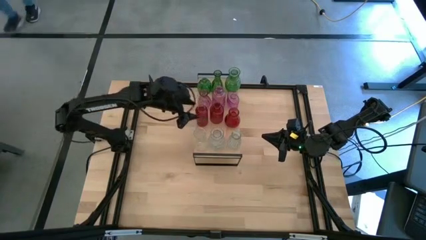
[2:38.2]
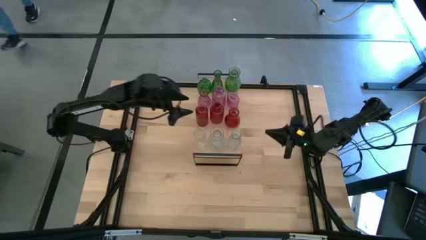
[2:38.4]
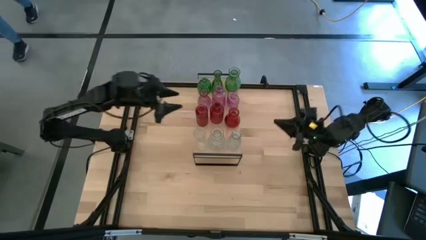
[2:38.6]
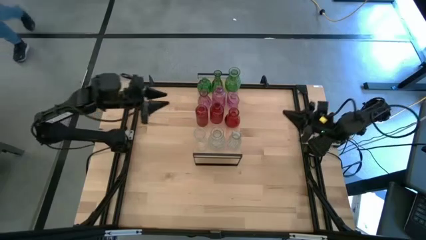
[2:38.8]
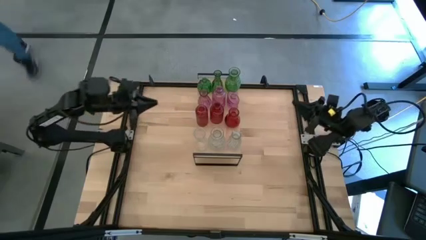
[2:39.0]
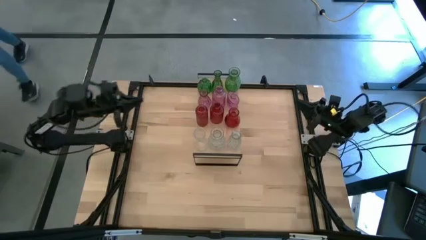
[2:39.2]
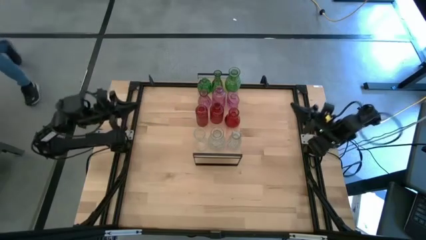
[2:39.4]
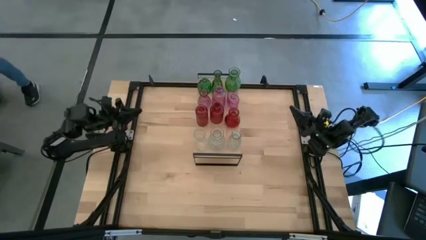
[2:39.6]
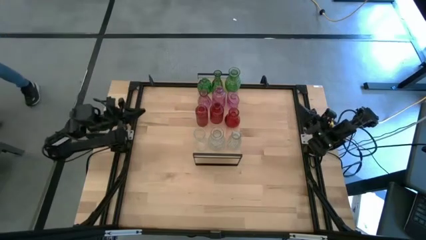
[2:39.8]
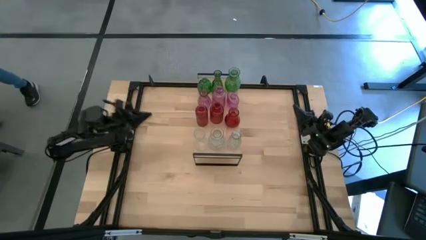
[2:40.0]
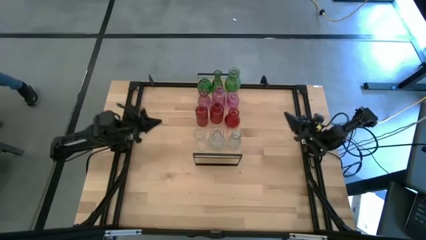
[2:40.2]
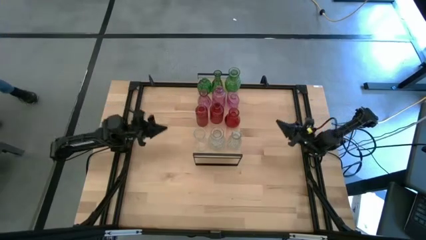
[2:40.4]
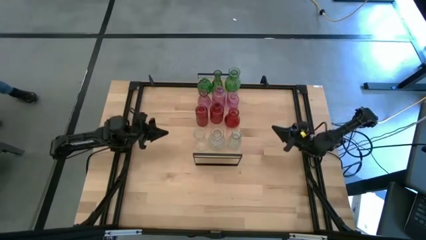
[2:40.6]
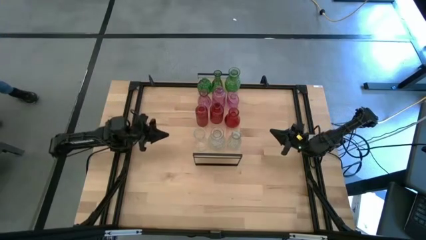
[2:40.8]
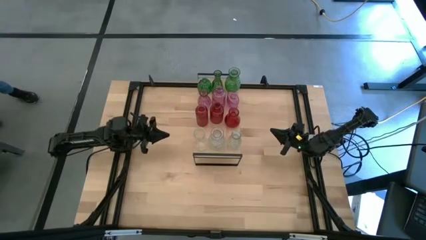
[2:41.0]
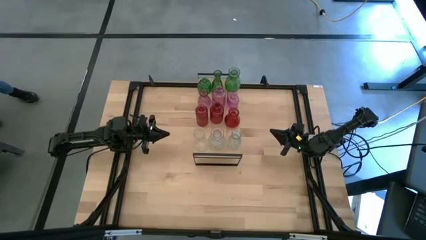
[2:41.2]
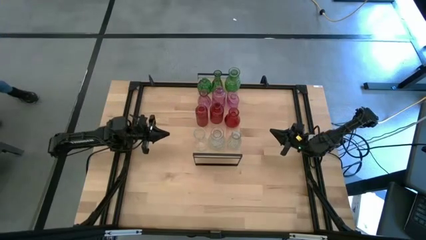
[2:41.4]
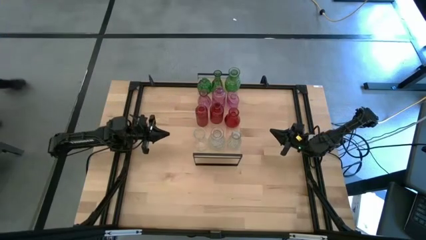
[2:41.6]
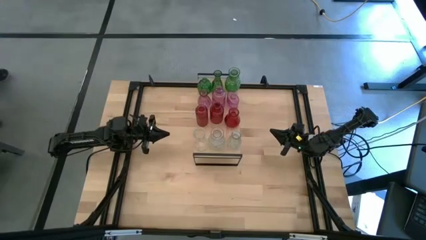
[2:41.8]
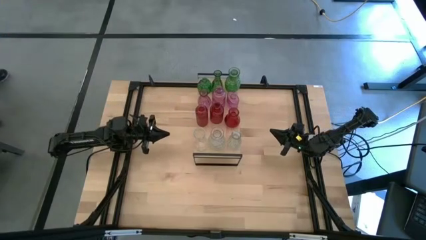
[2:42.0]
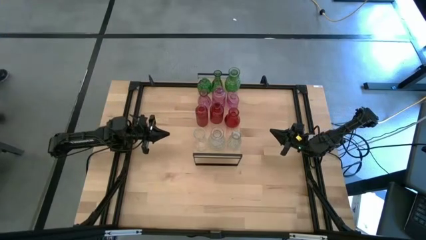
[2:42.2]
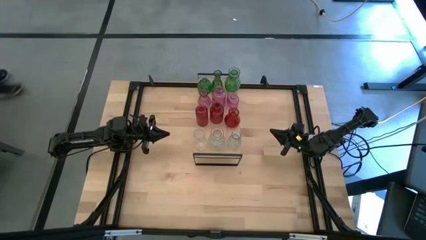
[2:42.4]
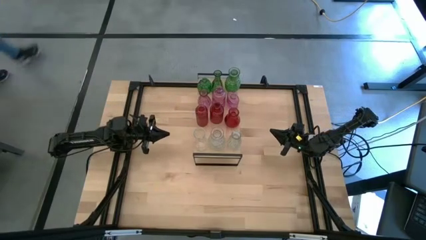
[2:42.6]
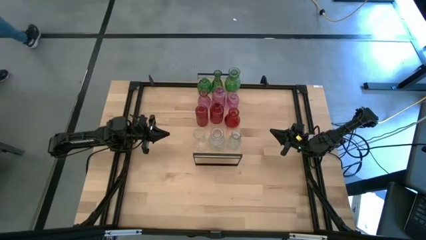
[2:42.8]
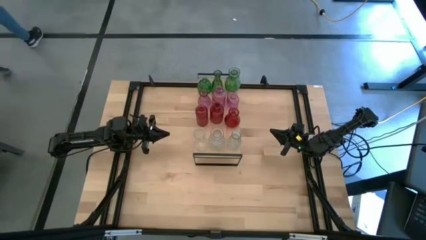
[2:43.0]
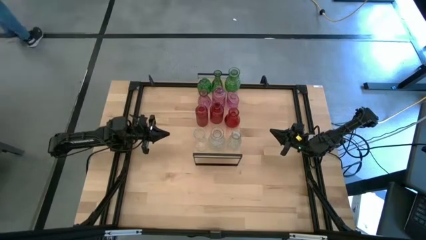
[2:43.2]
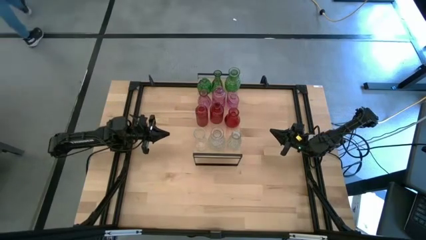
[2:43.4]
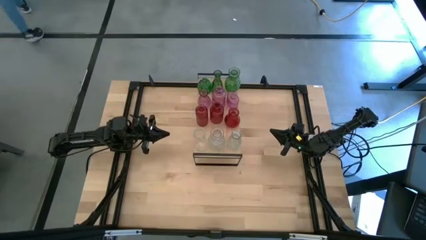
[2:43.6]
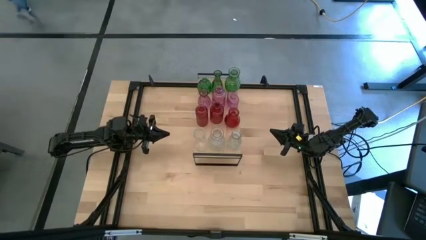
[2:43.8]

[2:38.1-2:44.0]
Task: sort vases onto shelf
Return to Home Position

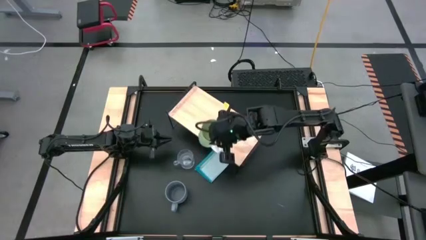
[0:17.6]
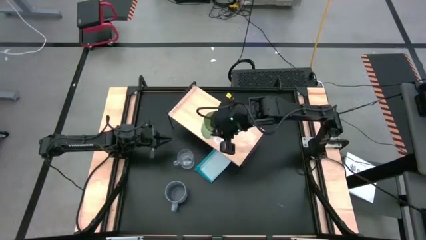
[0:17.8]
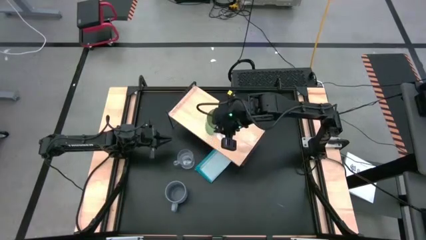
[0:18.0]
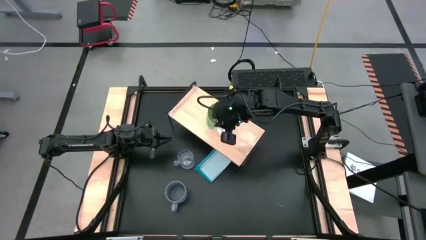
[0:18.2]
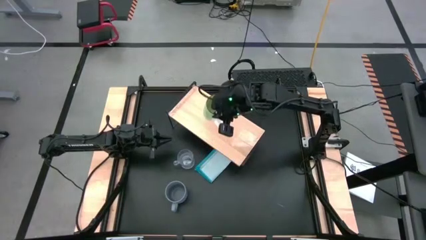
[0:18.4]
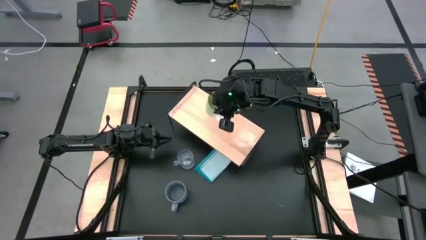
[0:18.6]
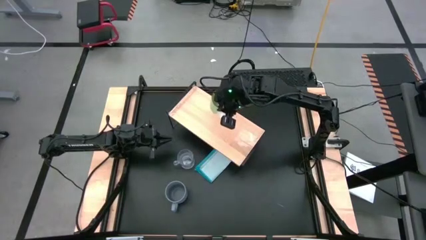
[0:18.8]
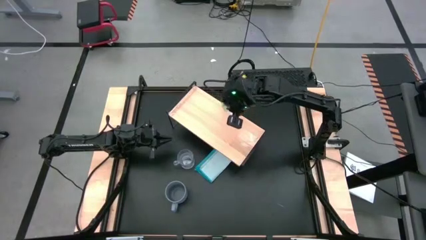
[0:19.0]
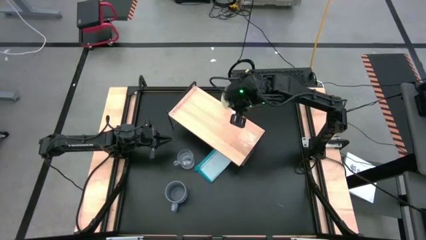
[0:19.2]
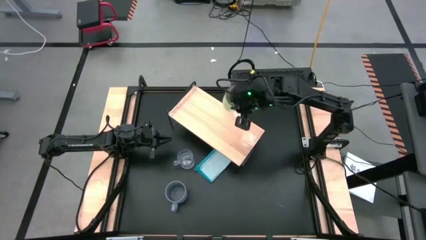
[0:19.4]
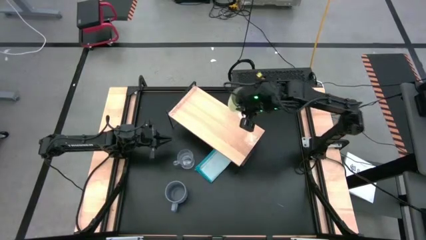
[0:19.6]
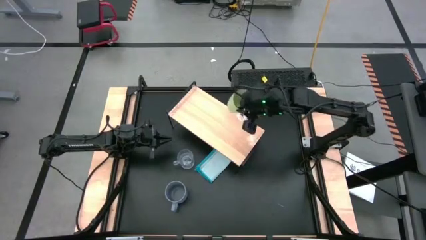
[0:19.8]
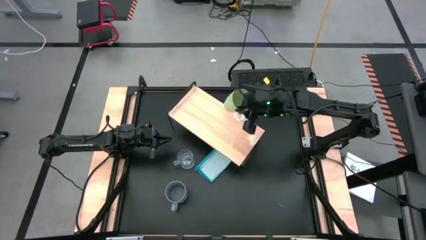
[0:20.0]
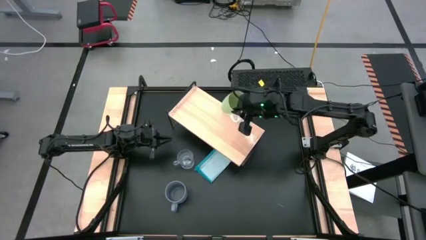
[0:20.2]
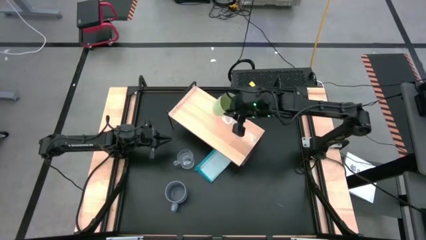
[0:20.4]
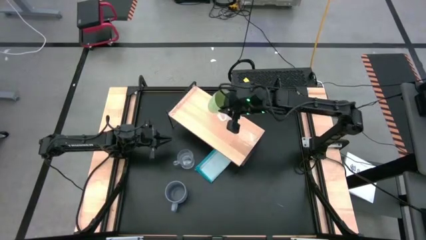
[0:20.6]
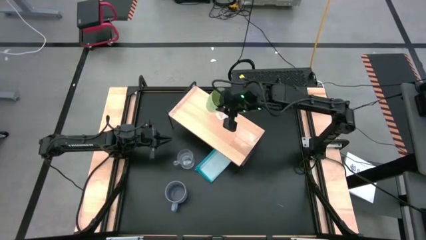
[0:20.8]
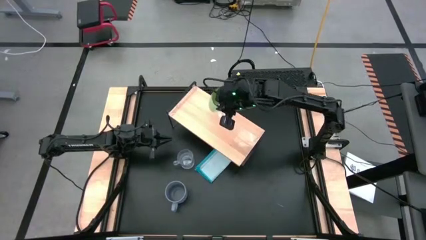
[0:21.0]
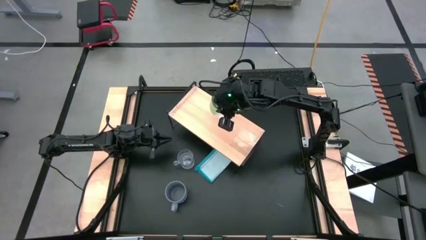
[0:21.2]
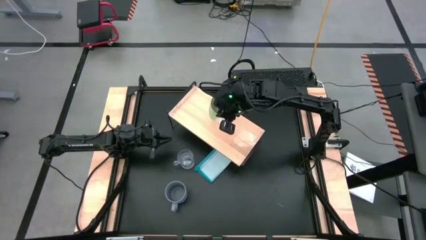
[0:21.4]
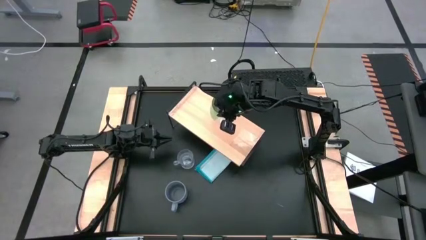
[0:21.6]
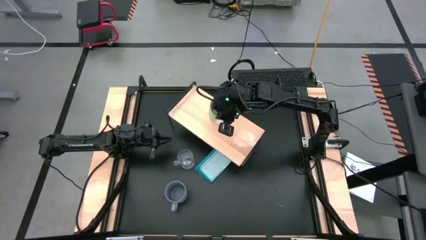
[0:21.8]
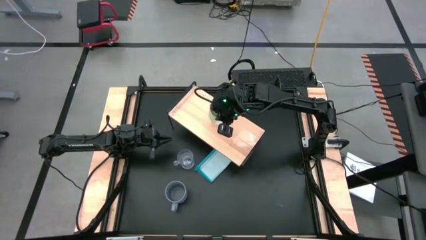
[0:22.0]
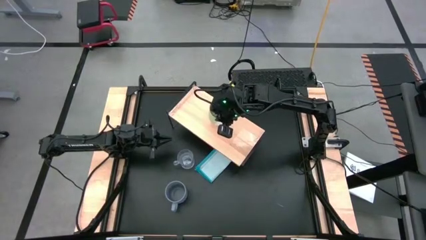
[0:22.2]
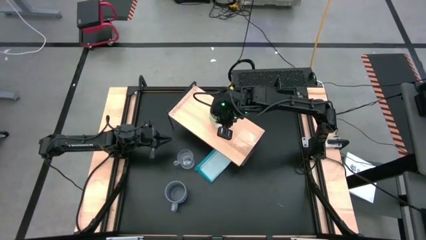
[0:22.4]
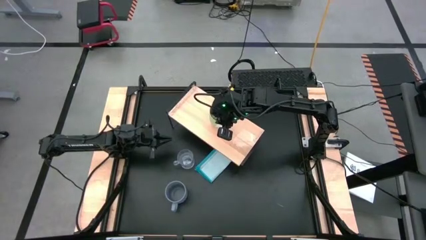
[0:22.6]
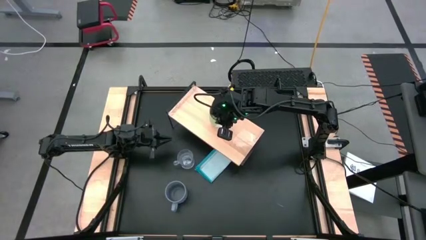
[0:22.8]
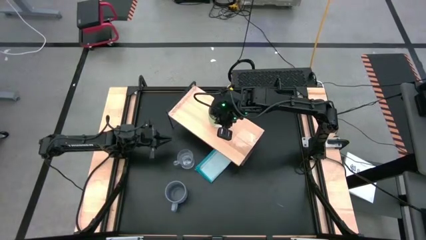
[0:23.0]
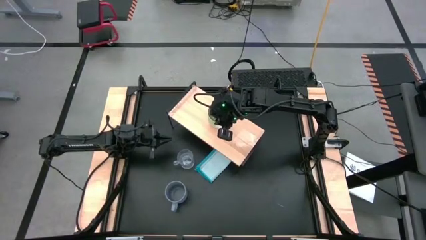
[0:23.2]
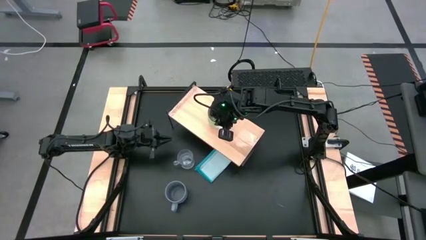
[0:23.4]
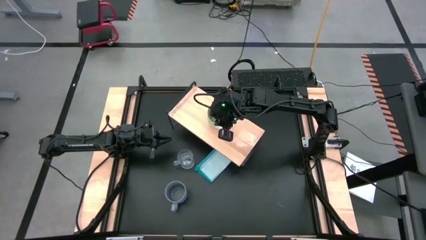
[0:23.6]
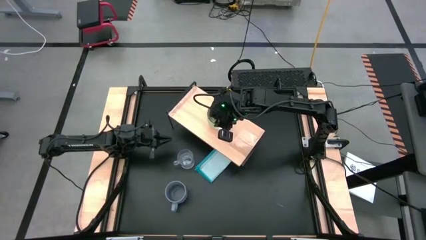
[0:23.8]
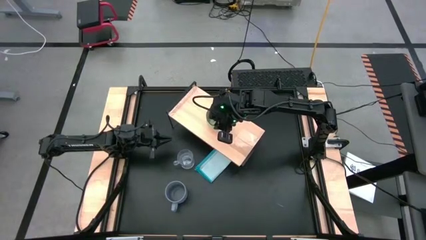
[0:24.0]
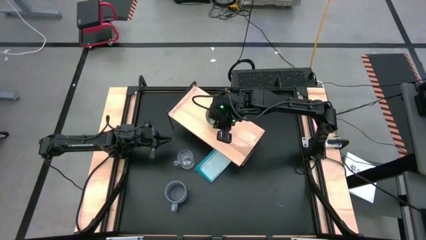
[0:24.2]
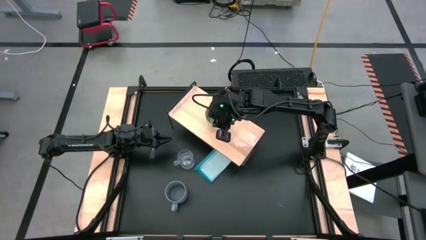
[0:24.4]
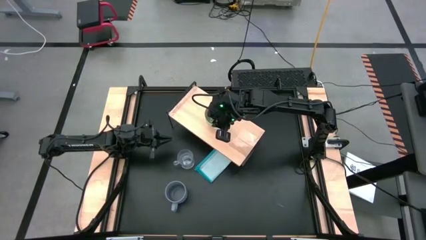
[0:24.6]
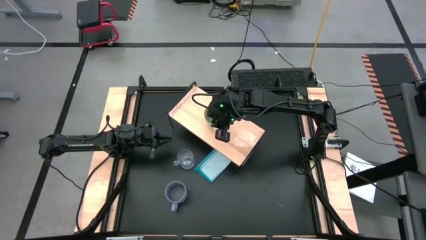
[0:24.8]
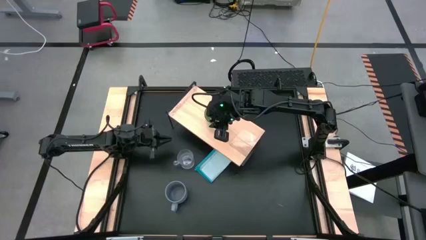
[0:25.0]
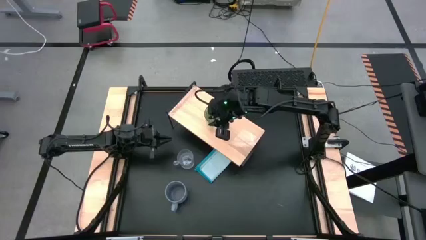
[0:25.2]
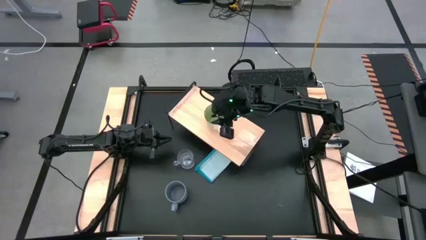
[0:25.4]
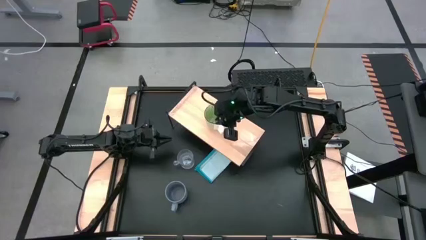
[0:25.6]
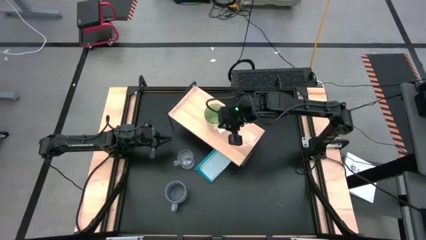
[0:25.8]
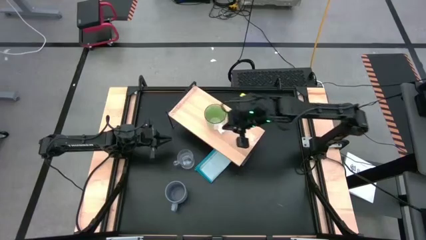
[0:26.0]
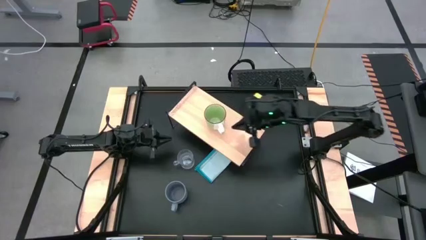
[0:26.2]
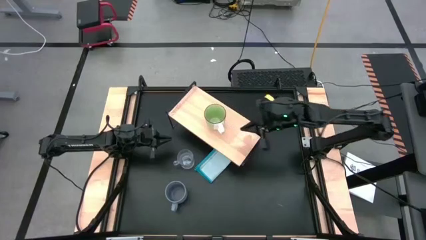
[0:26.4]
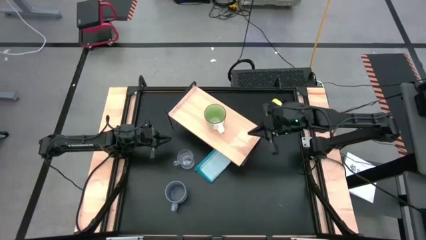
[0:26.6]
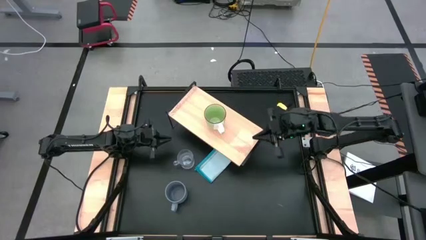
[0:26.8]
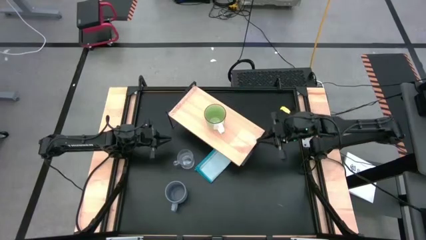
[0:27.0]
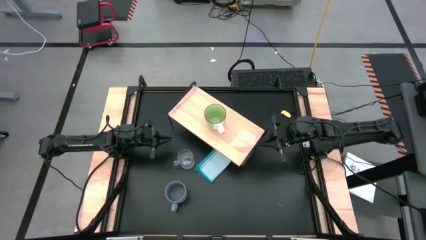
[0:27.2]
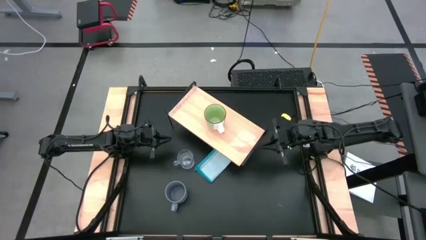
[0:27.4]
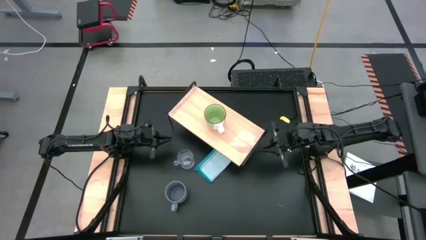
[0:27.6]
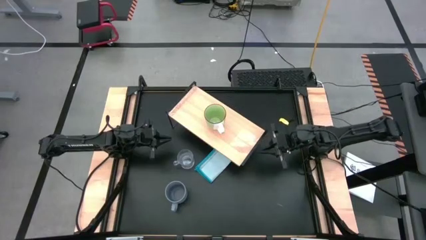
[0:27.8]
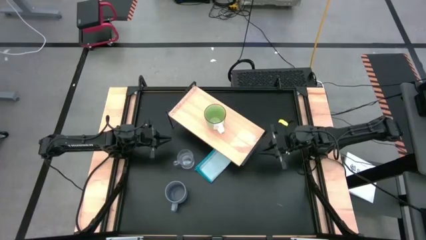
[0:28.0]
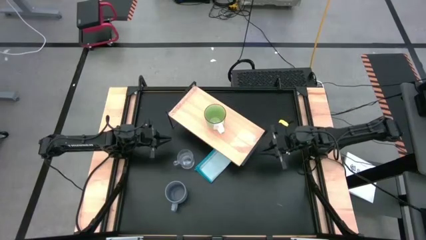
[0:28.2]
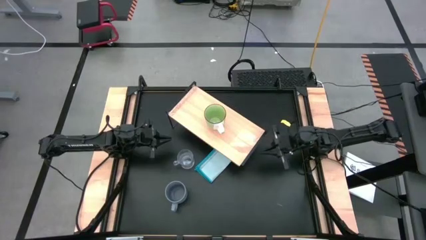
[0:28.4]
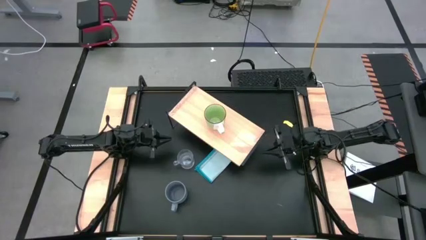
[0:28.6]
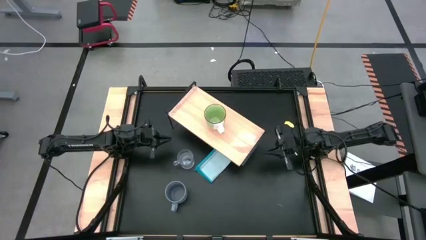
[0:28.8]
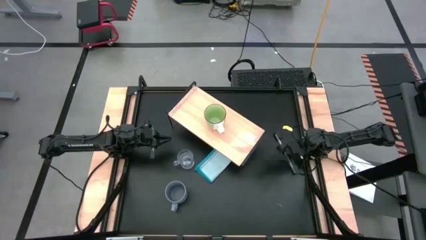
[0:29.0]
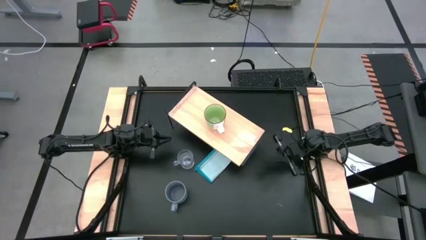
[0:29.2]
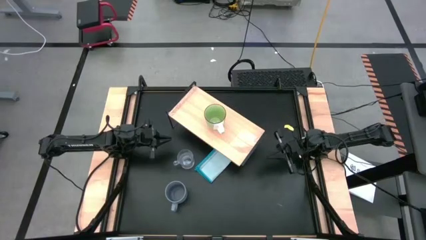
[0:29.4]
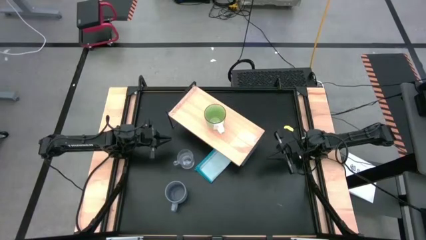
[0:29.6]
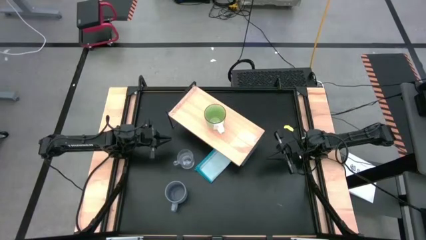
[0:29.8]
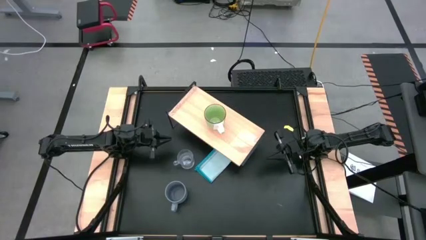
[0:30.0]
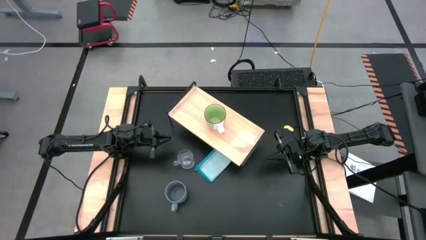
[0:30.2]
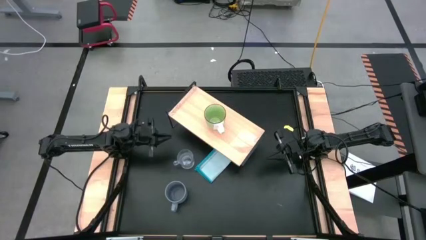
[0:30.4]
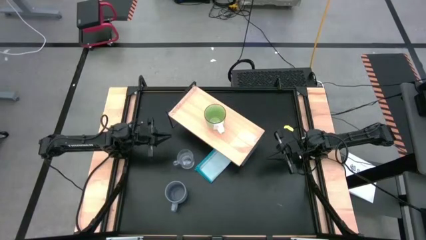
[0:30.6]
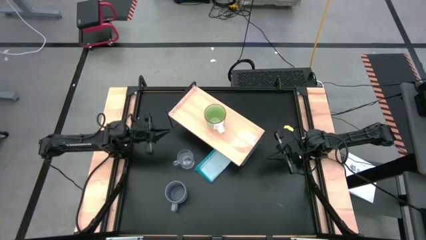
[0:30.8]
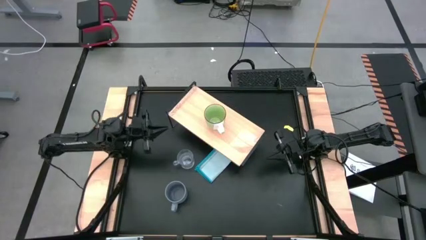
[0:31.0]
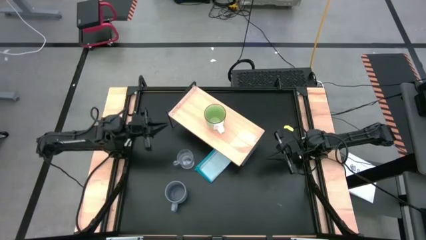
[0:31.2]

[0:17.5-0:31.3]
Task: Stack small to large cups/mugs on shelf
Put the green mug on the shelf
